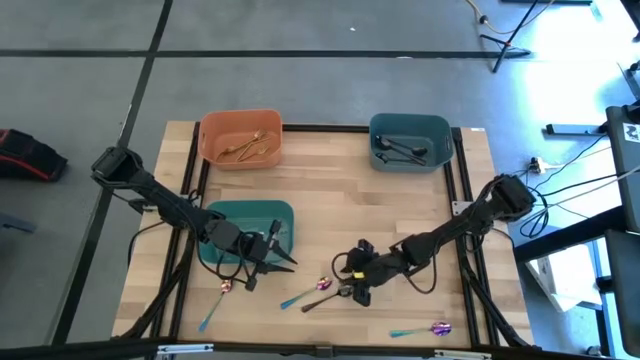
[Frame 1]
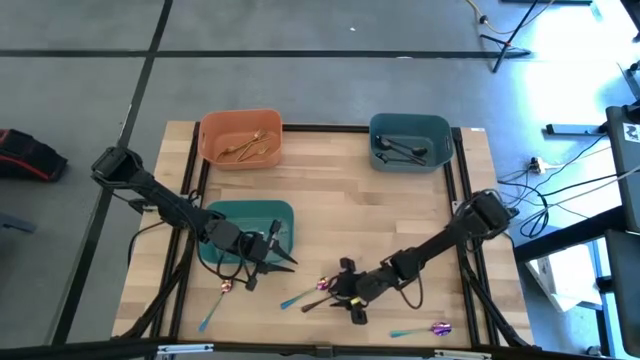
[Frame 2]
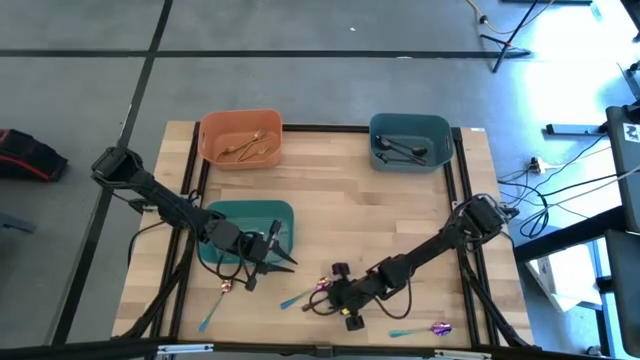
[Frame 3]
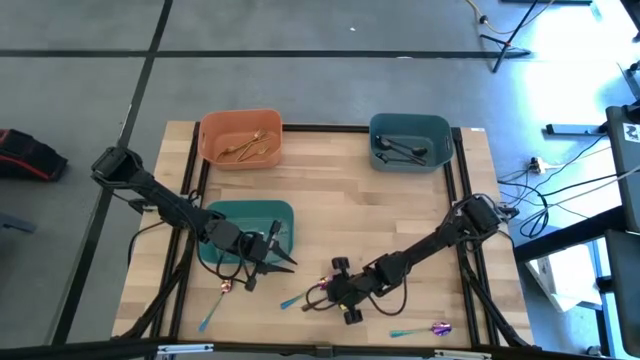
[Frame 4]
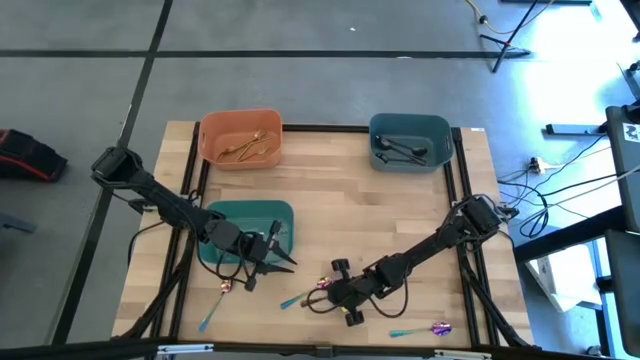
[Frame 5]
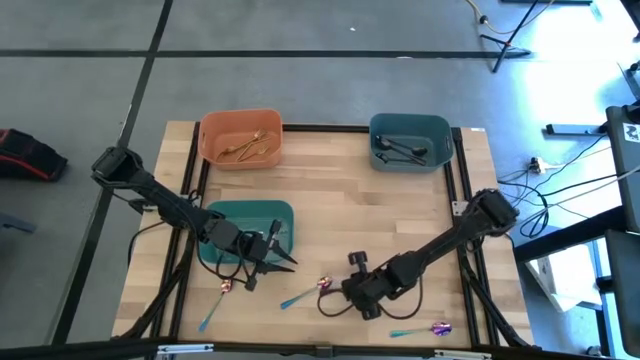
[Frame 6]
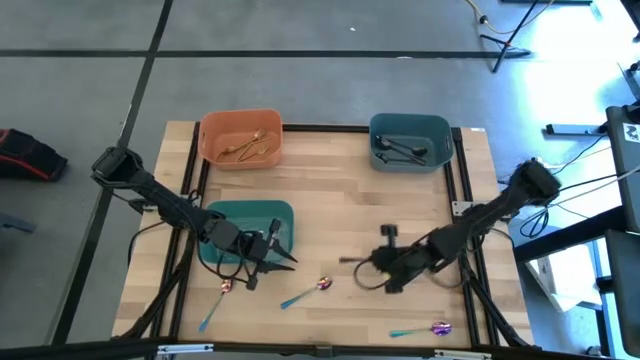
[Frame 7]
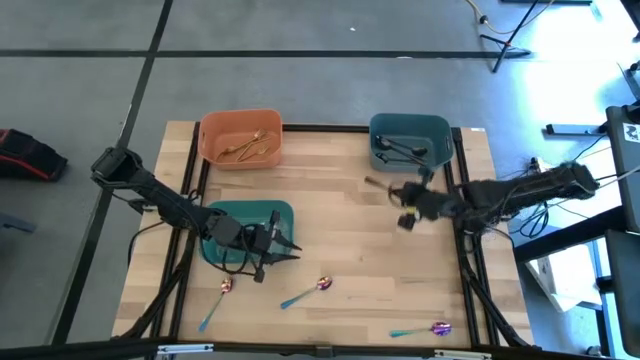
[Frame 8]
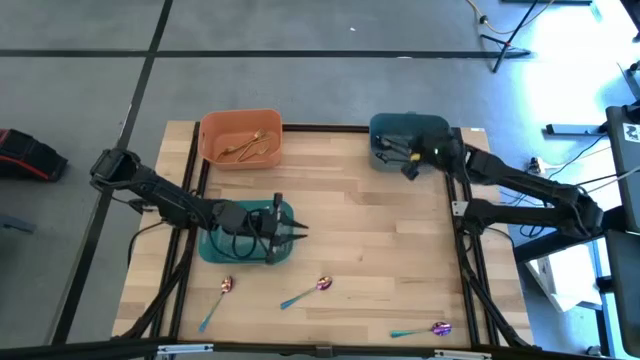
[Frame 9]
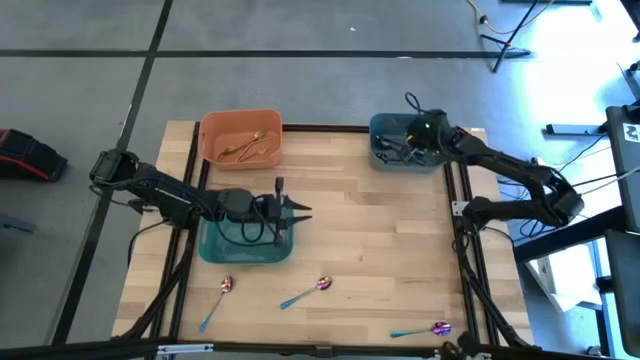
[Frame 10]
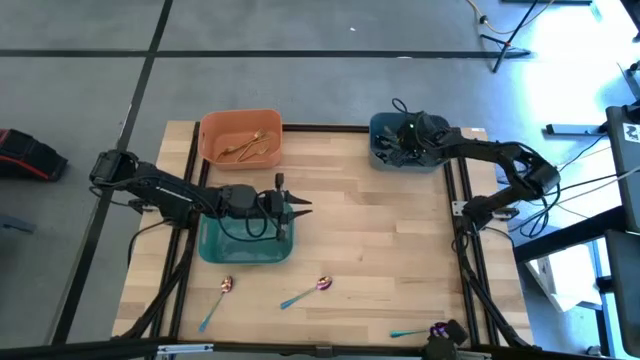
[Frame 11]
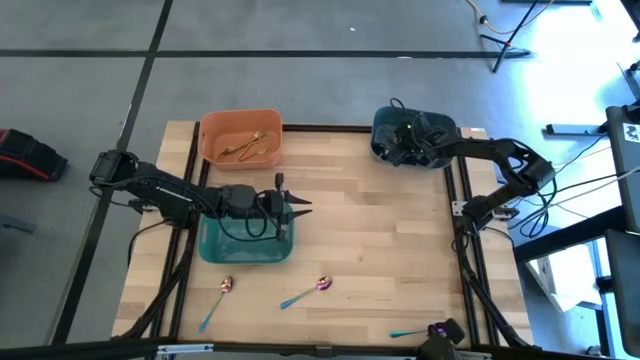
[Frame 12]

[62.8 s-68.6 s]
Task: Sort silverware by color (type)
Put the black spoon into the top blue bin

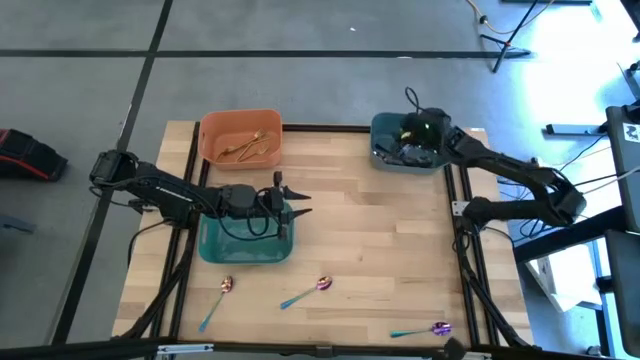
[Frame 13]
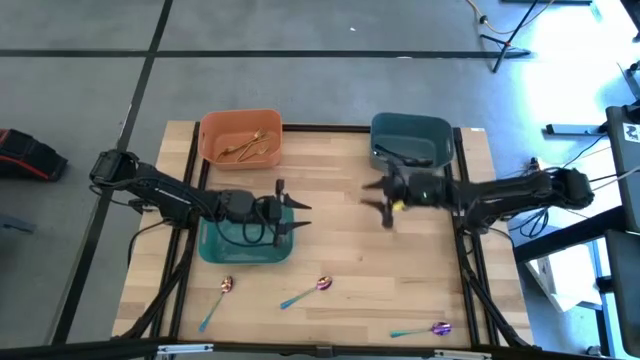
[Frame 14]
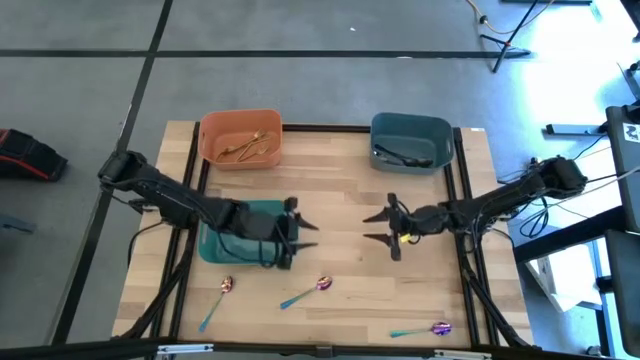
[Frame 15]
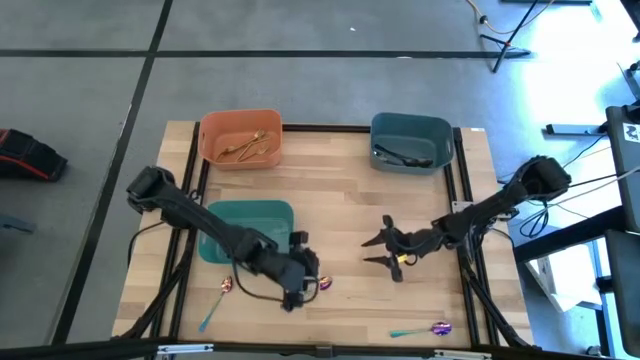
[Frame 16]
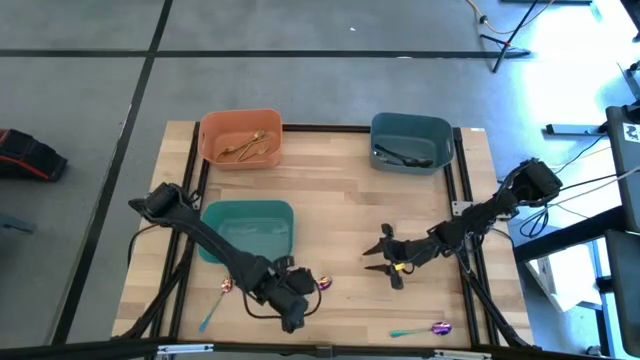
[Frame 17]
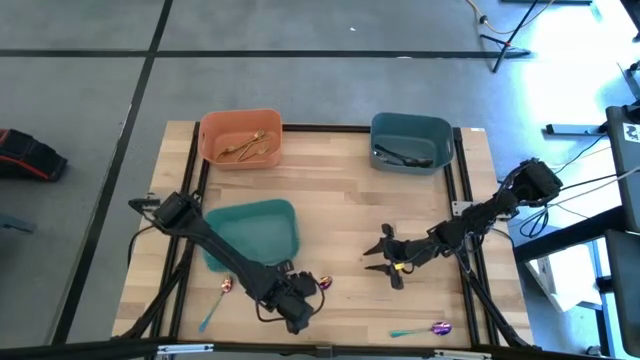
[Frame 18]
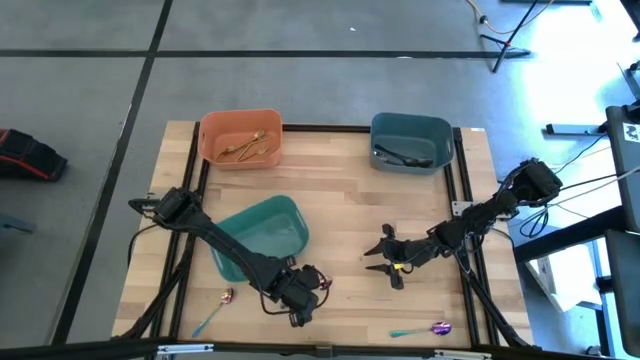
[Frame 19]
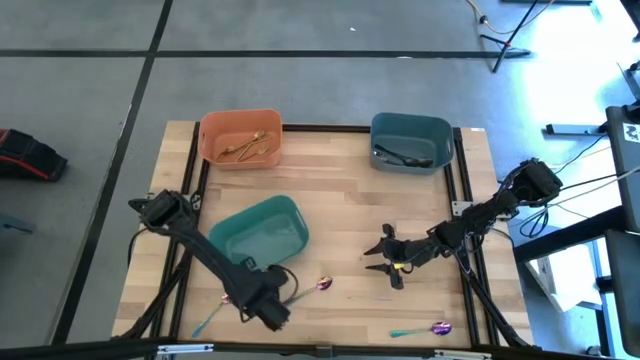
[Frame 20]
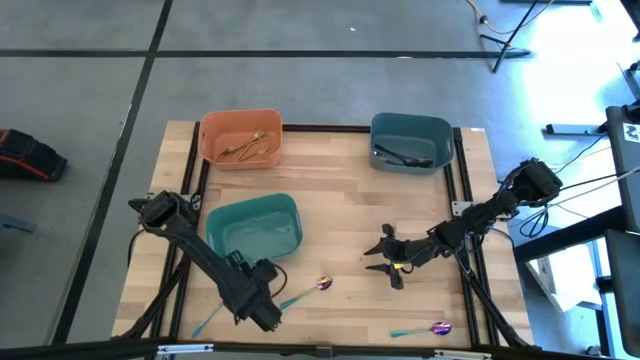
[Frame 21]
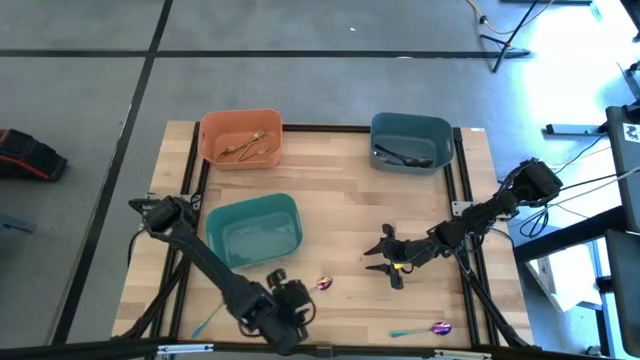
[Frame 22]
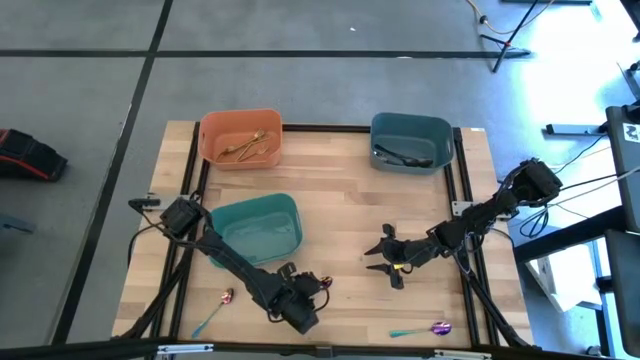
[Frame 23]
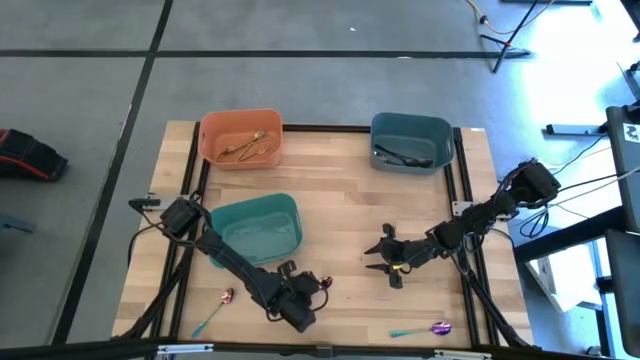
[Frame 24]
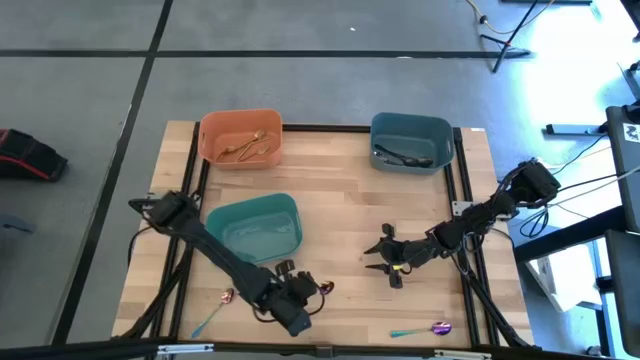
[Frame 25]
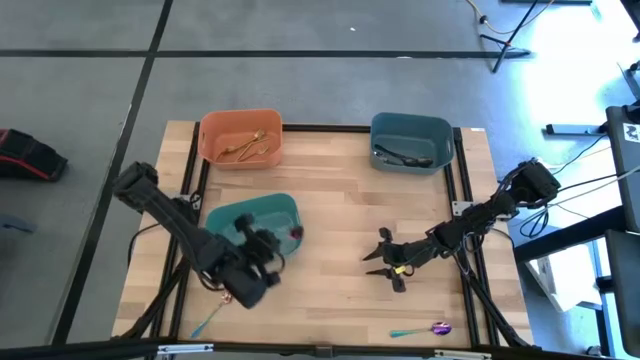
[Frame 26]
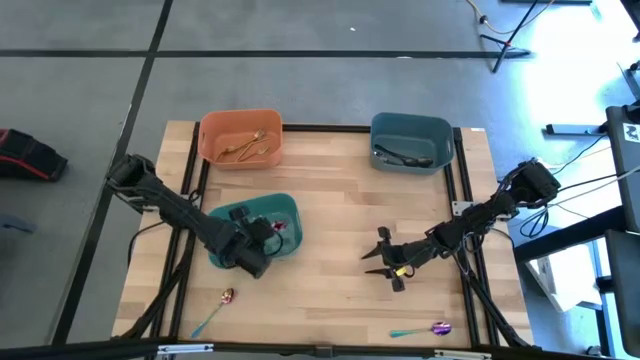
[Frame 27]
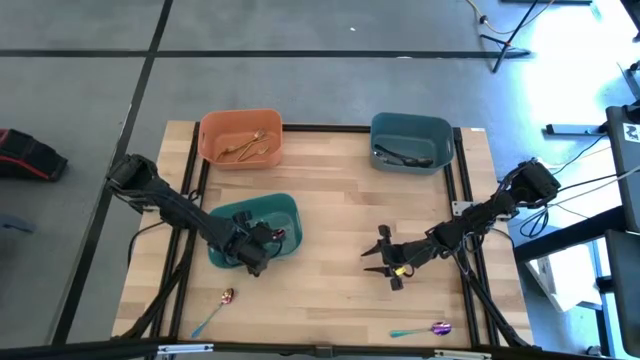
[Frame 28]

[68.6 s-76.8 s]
Put the center blue spoon into the bottom blue bin

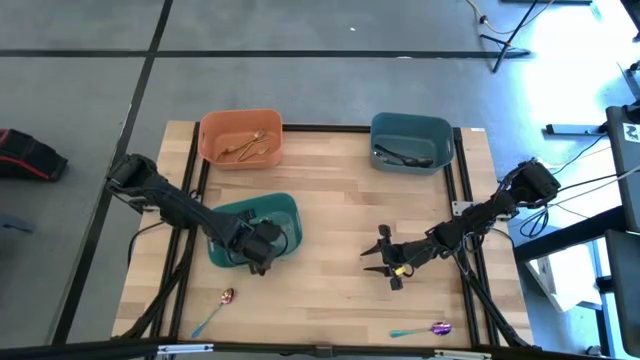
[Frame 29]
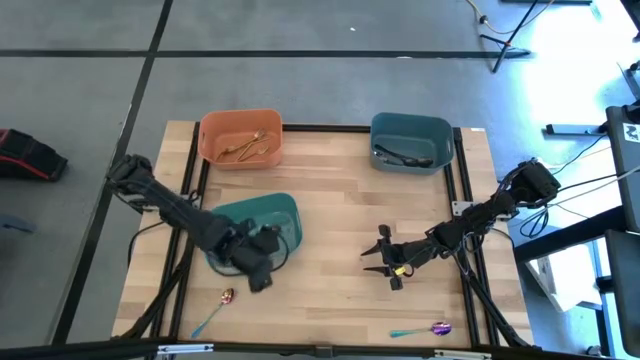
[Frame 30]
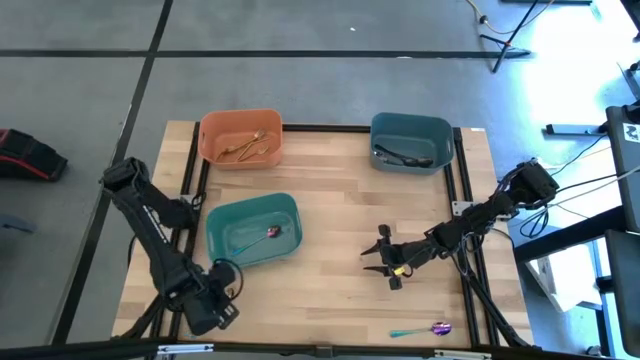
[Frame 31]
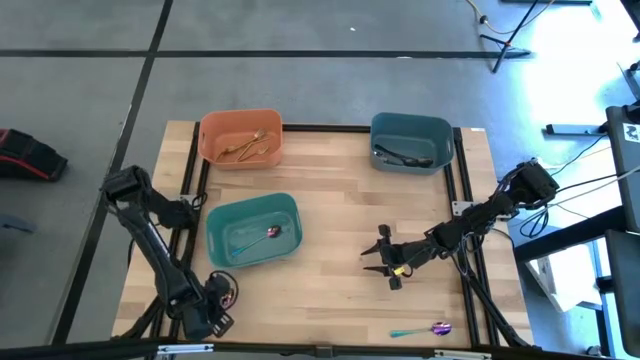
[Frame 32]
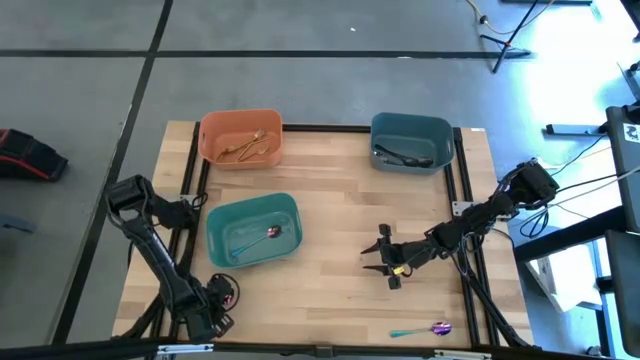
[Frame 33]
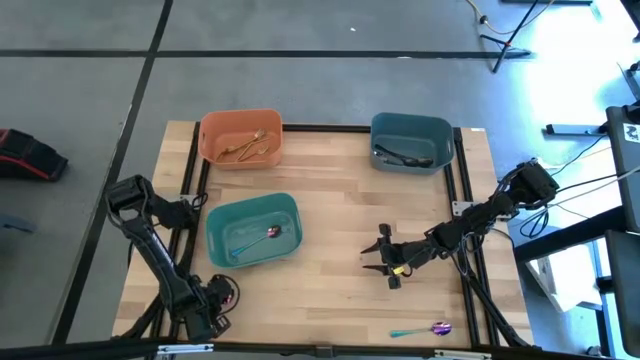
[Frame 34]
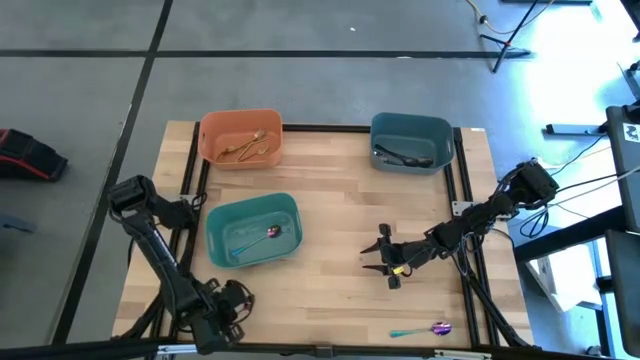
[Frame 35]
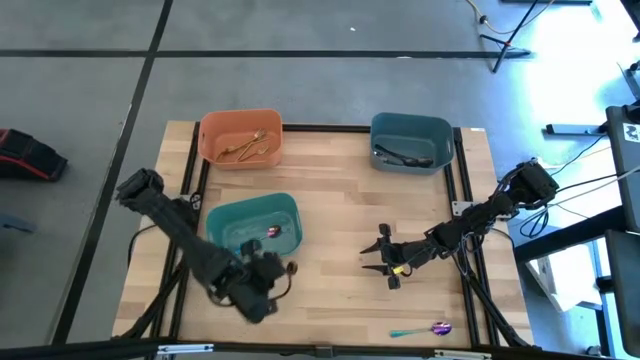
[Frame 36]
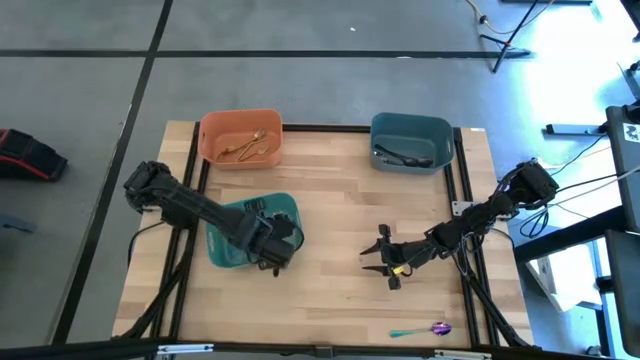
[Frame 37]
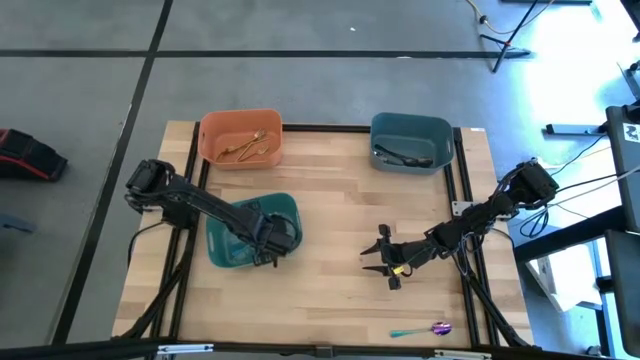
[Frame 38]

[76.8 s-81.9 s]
Put the left blue spoon into the bottom blue bin

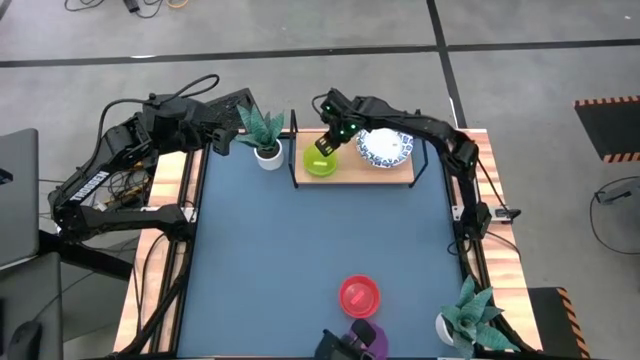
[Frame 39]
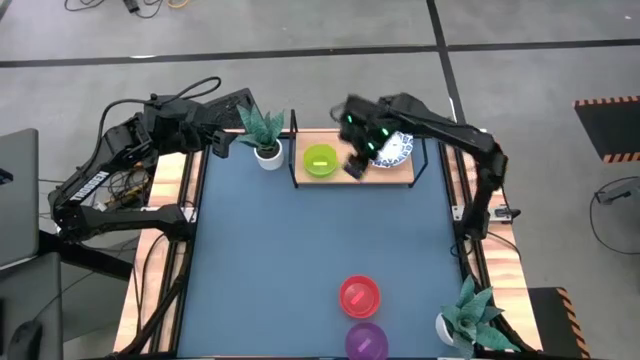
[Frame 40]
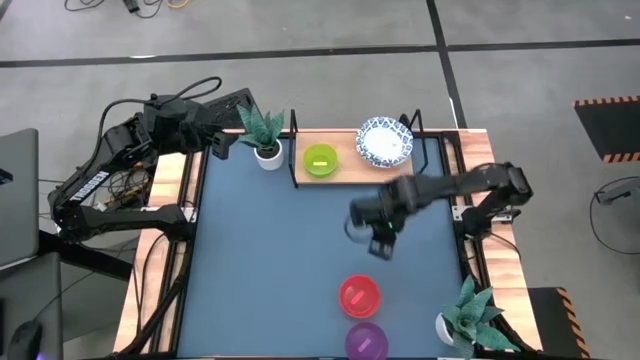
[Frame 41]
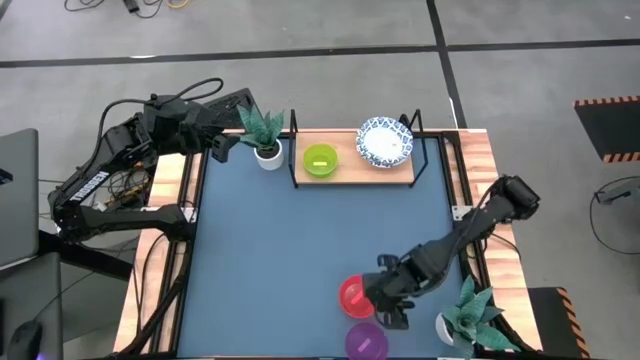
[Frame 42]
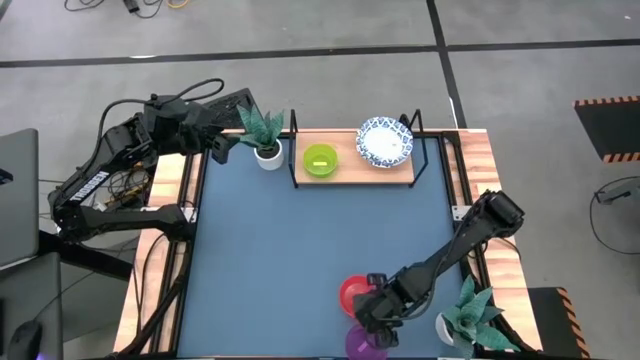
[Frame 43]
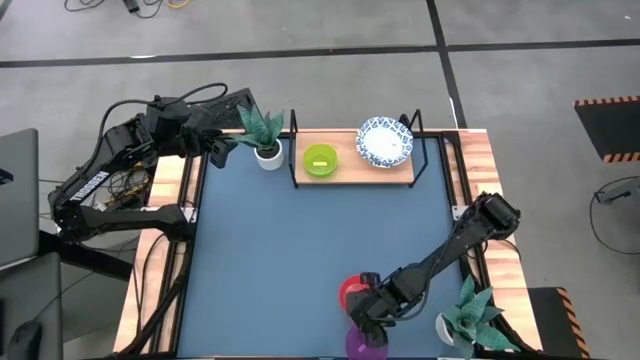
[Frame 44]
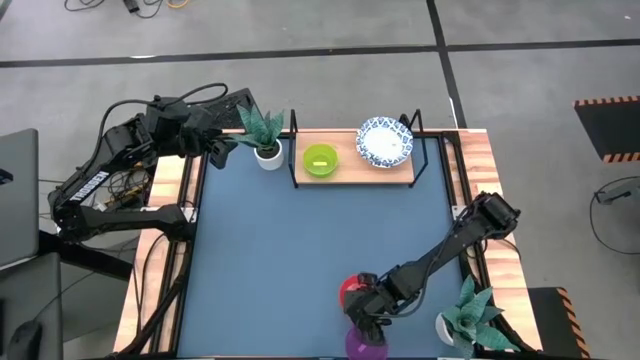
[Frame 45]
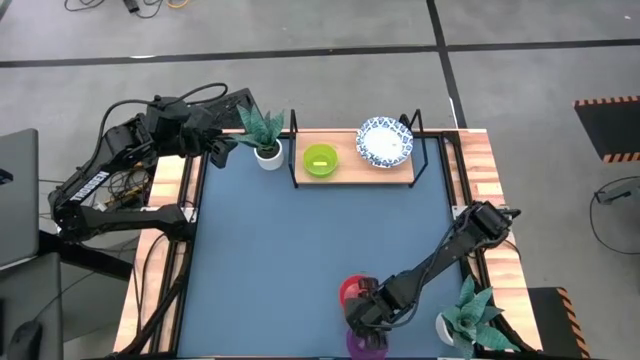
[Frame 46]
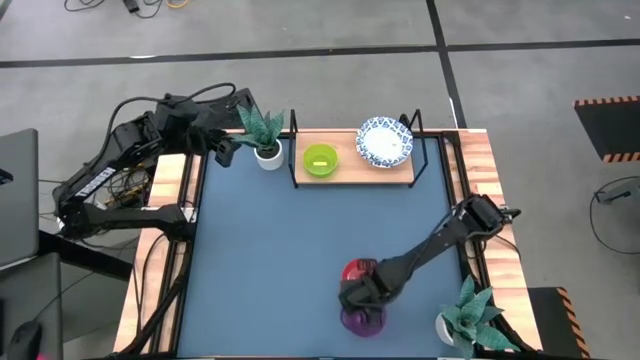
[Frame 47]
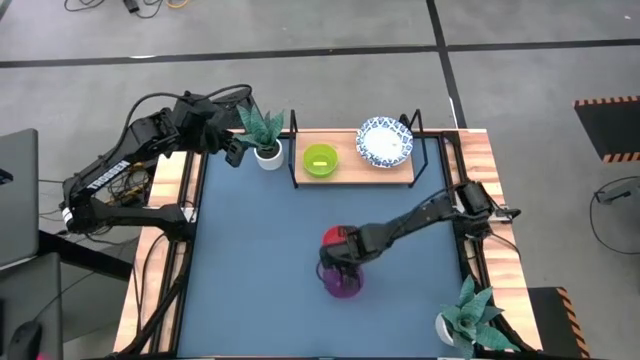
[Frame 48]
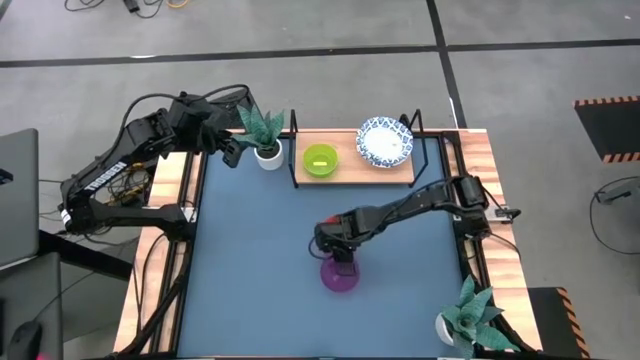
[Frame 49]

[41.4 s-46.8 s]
Task: Place and stack bowls onto a shelf
Move the bowls to the center of the table
